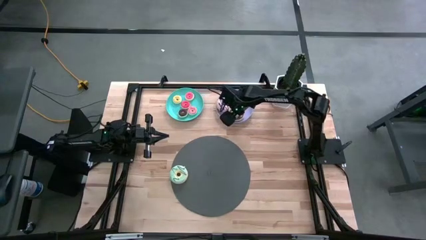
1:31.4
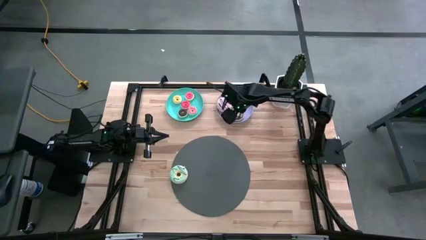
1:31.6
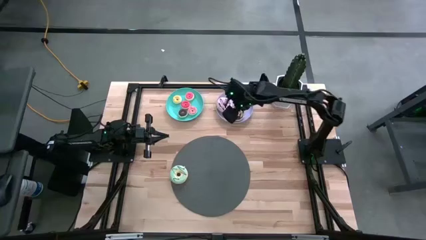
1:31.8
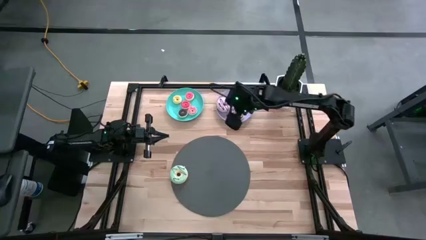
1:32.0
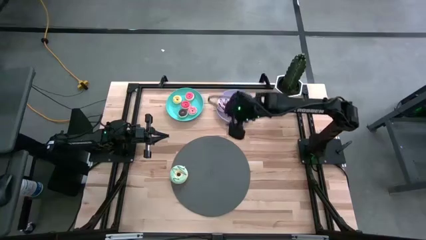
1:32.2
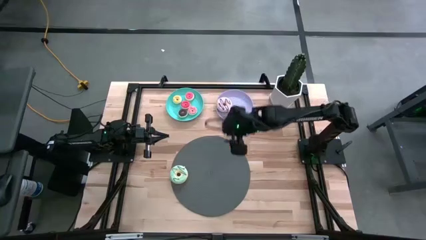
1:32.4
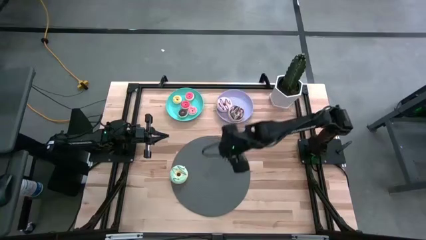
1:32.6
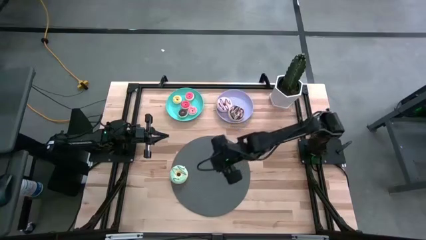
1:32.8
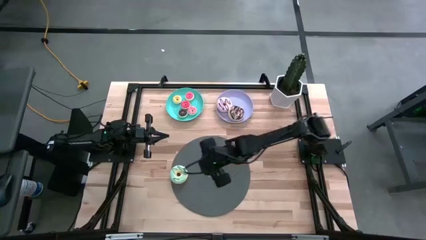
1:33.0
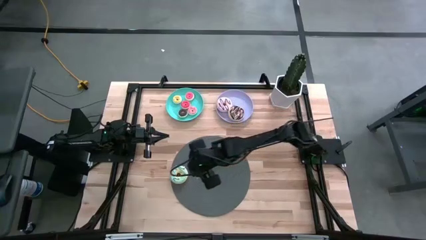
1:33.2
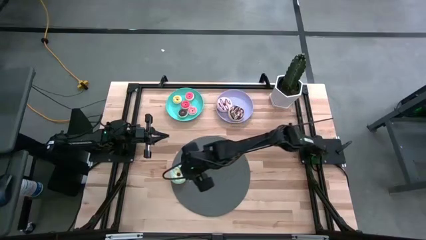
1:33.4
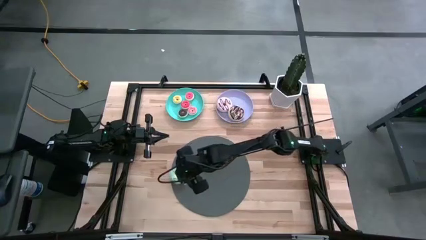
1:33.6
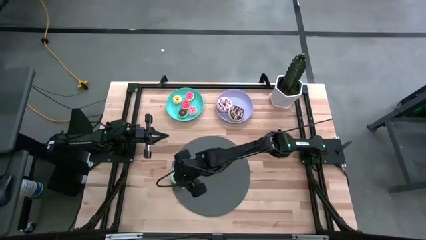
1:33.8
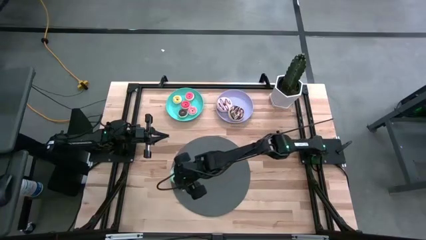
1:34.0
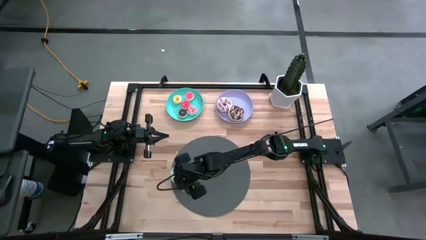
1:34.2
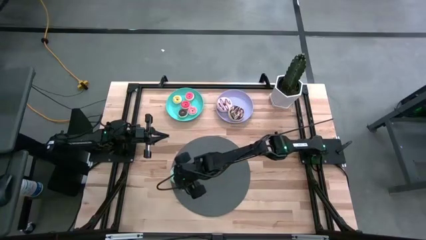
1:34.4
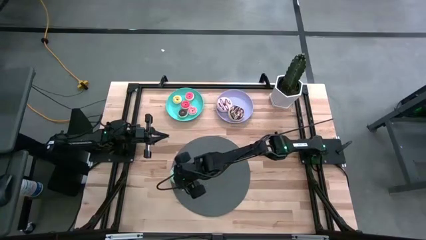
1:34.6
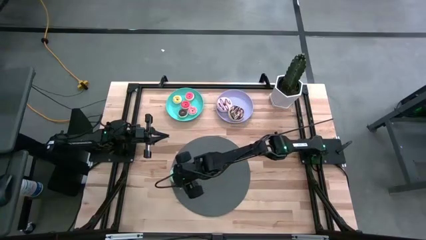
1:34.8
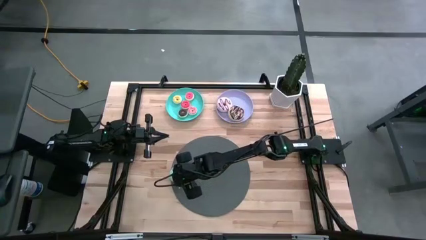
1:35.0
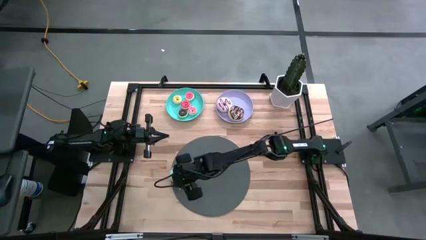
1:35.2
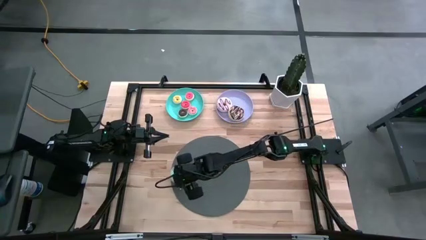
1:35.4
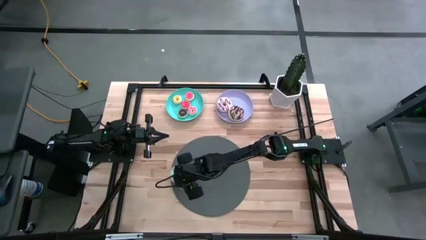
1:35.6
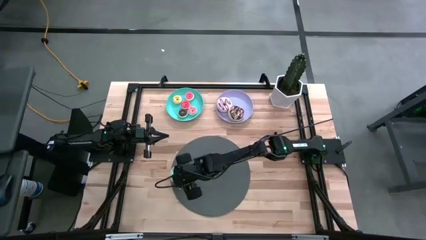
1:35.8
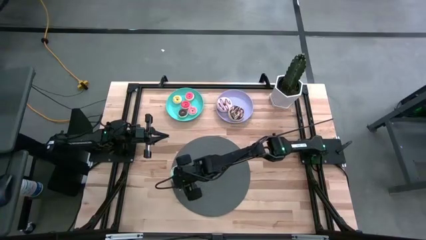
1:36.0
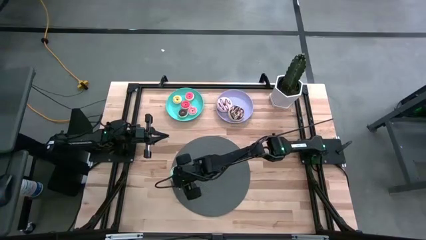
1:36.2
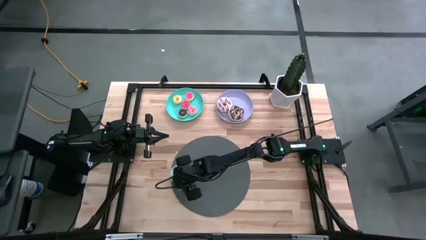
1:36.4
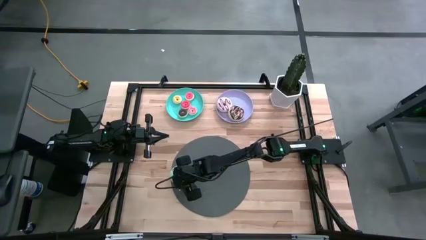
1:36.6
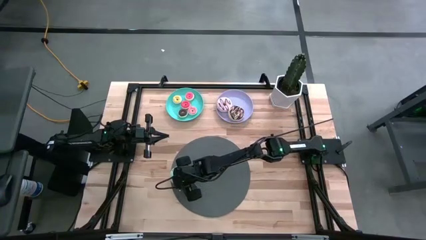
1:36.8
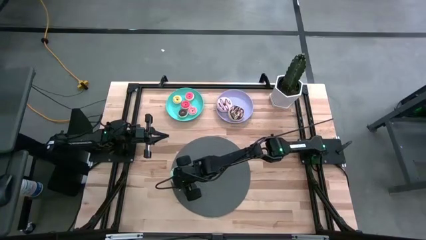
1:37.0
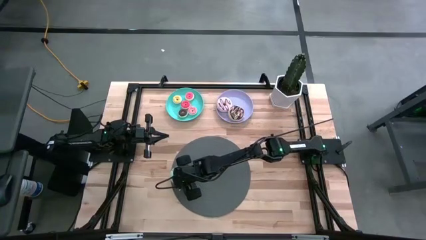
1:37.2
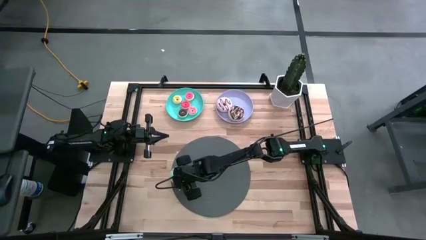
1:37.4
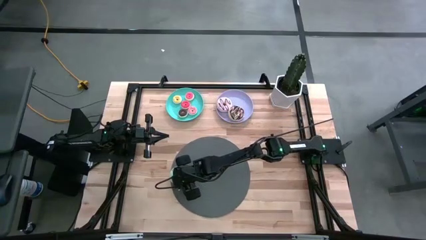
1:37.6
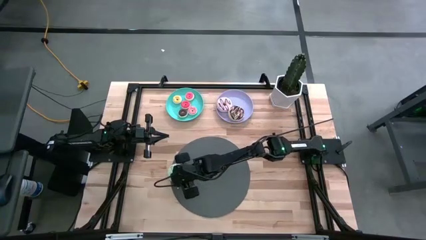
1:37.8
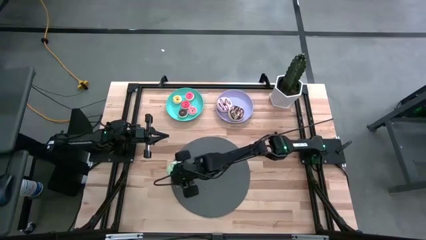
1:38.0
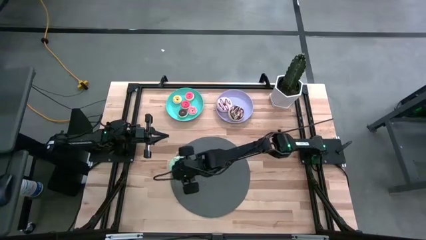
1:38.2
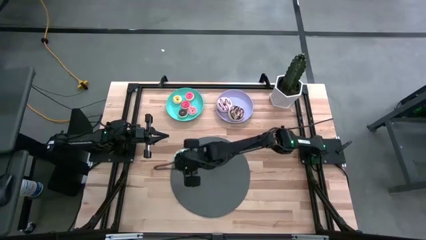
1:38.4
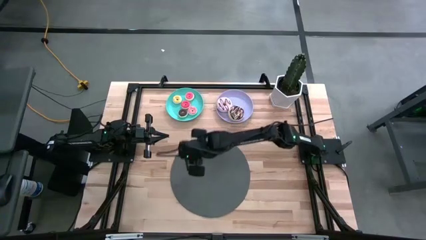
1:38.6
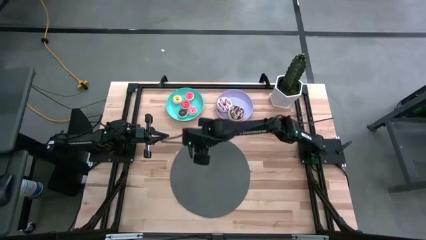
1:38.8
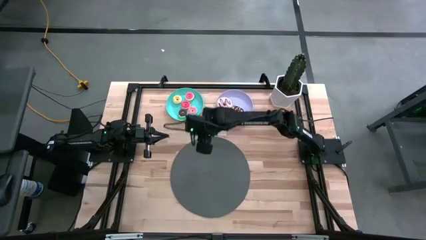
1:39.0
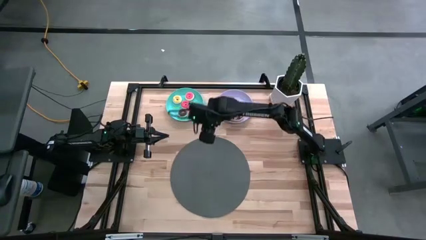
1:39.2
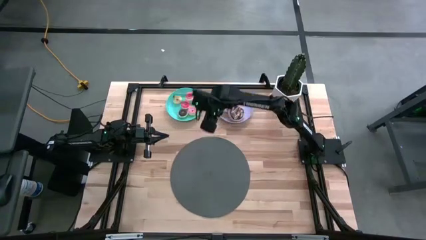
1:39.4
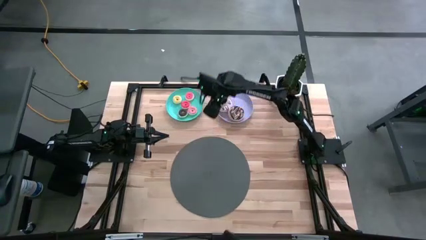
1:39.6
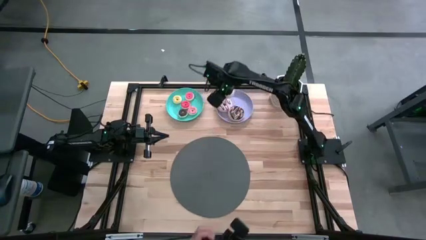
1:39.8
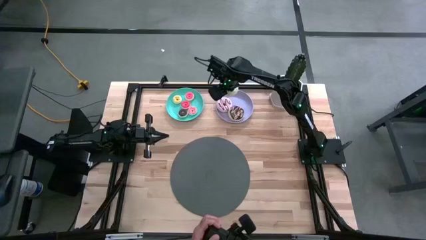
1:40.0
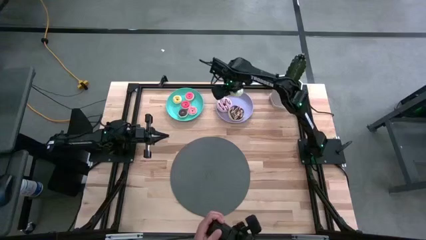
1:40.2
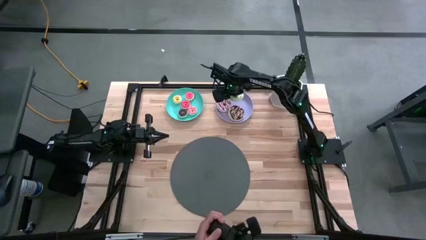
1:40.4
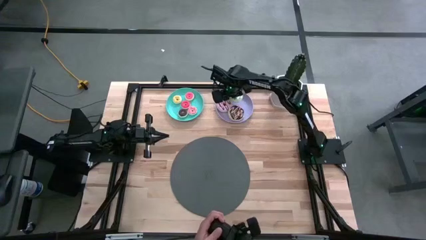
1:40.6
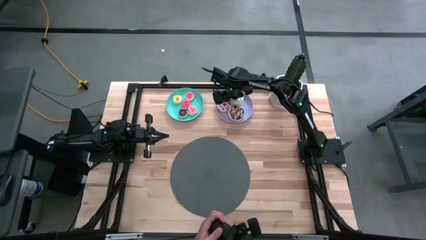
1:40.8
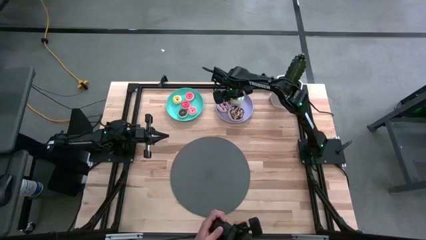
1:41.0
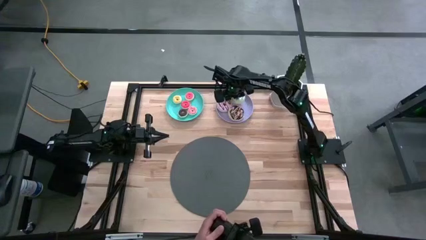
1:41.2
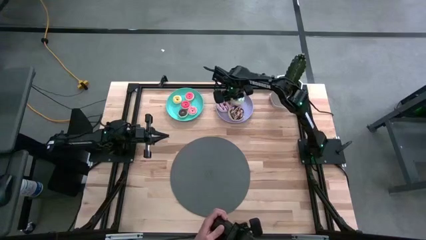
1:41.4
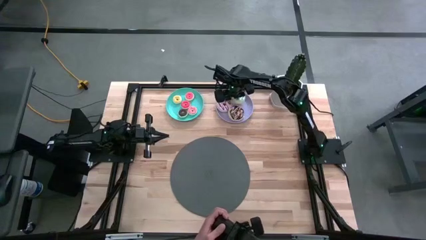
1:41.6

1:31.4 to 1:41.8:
Task: Pick & Place donuts
Put the large green donut on the purple plate

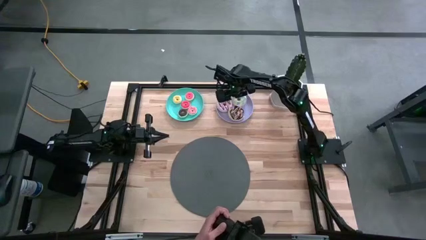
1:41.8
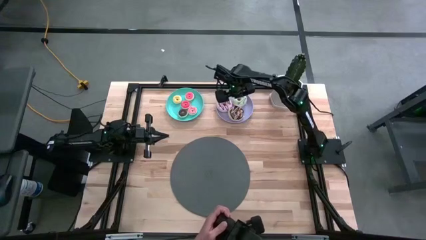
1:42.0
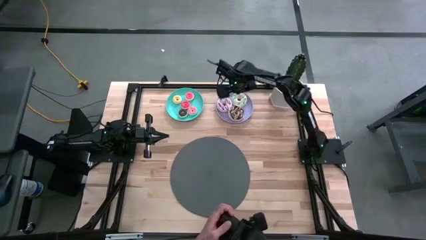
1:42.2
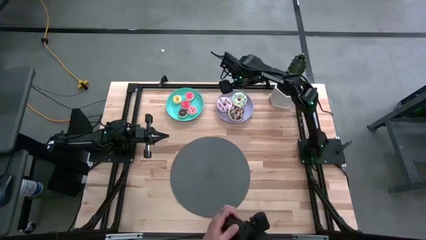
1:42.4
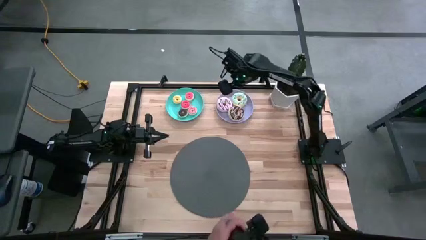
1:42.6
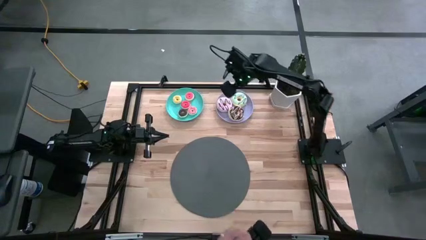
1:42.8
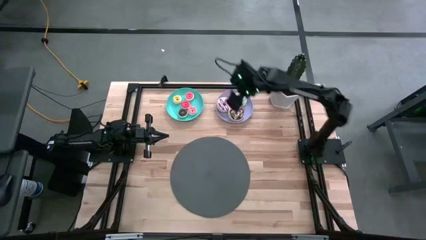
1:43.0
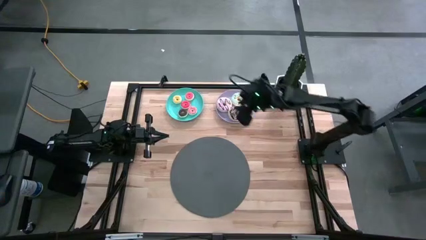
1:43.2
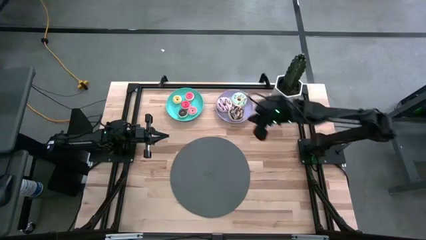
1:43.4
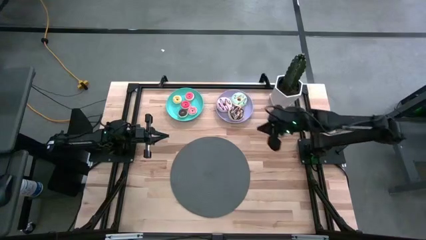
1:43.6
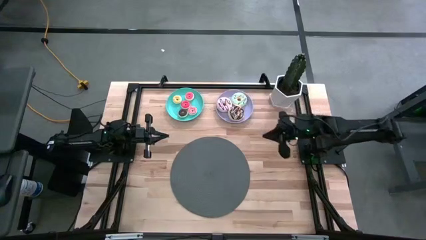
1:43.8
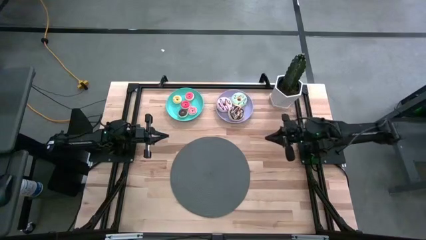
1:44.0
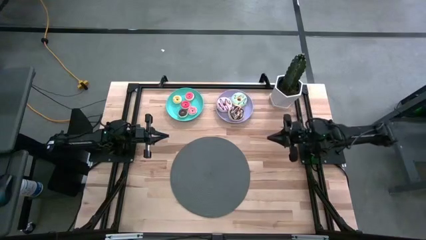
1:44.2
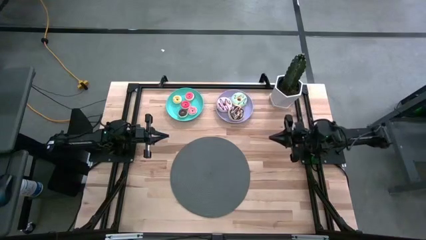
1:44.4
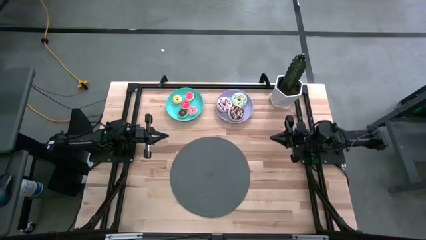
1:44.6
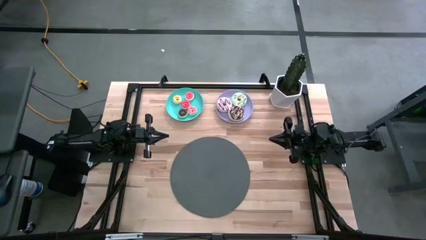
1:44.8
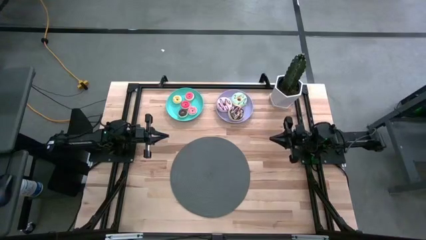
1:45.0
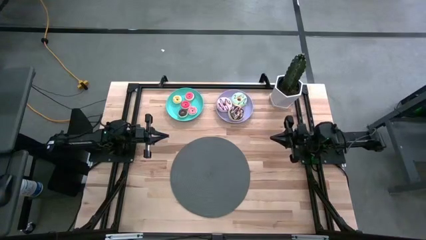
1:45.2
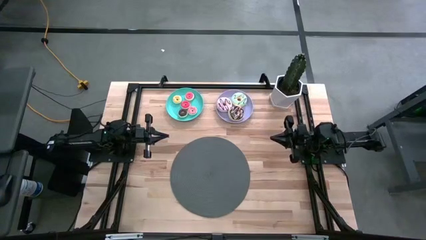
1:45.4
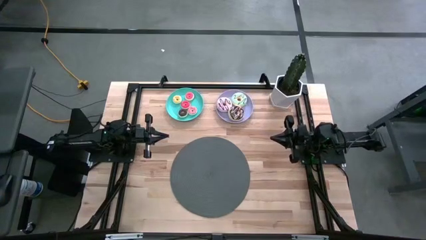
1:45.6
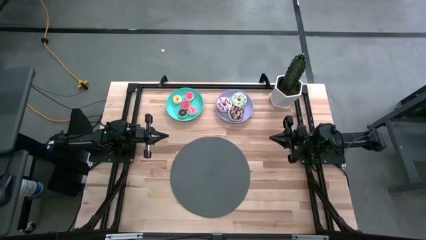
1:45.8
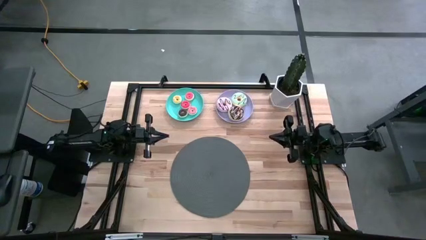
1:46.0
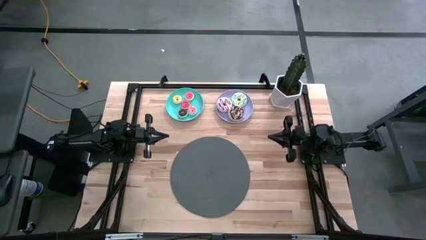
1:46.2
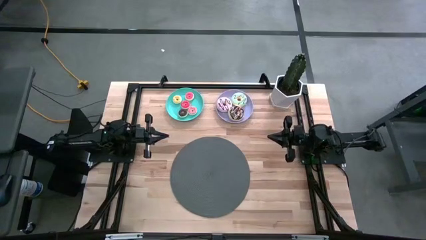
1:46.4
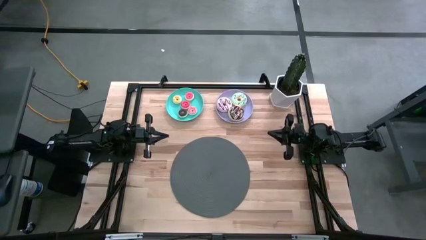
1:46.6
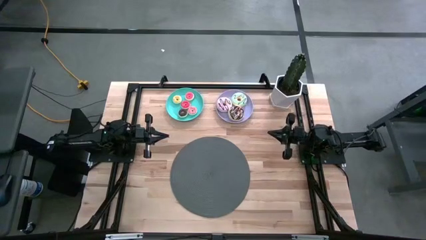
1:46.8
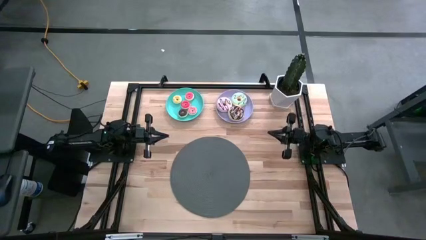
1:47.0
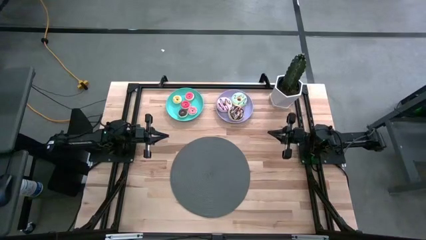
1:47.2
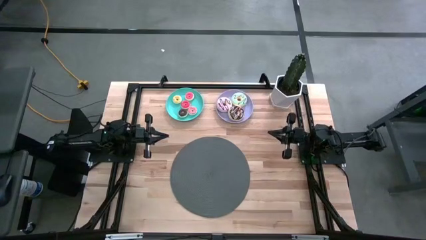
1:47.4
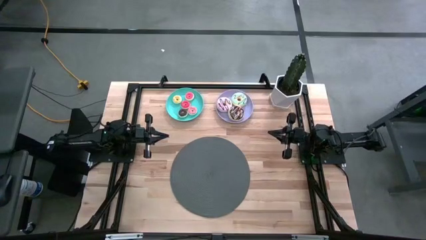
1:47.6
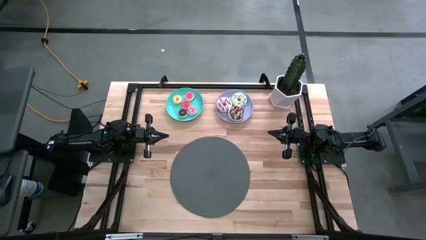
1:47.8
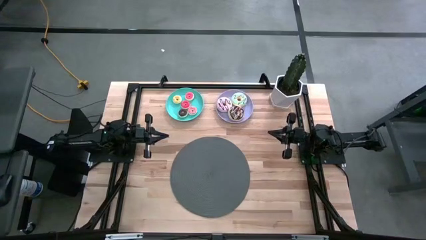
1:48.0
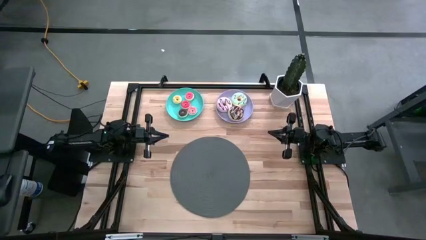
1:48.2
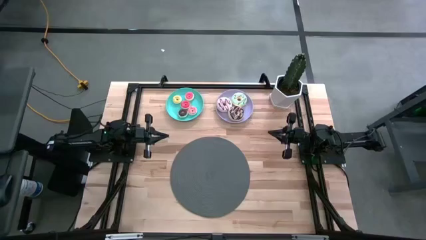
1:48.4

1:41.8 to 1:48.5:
Return to Home Position

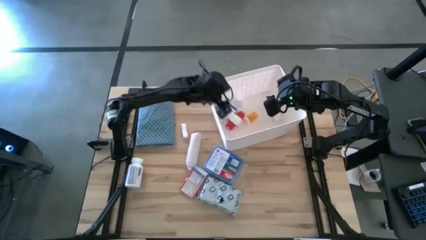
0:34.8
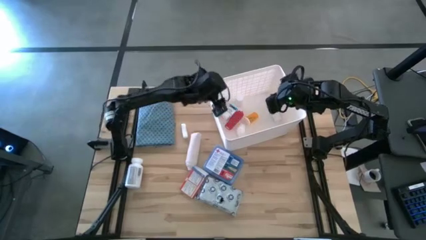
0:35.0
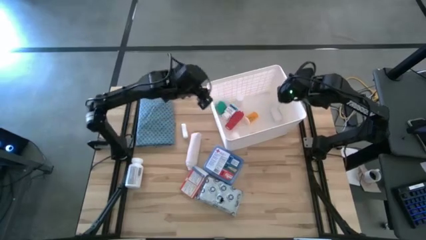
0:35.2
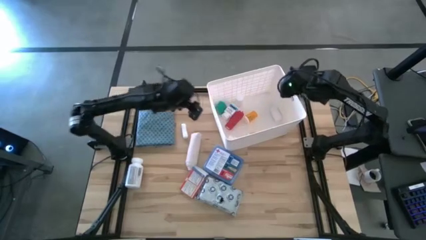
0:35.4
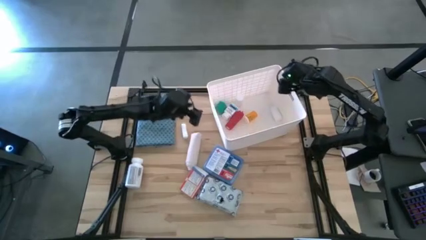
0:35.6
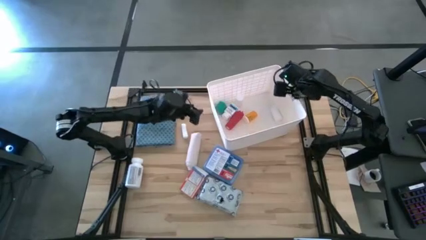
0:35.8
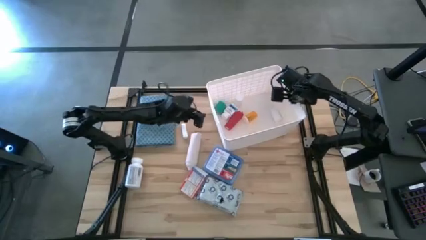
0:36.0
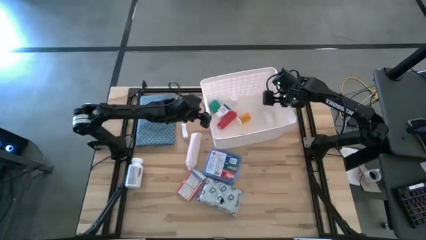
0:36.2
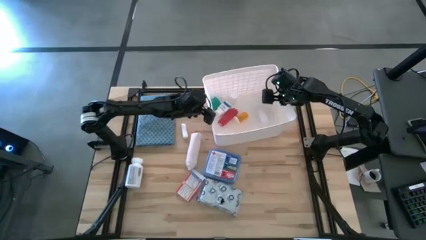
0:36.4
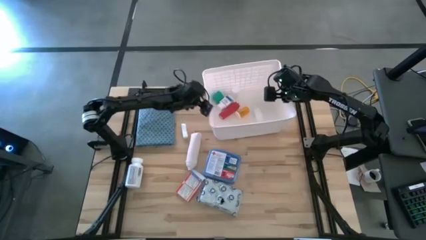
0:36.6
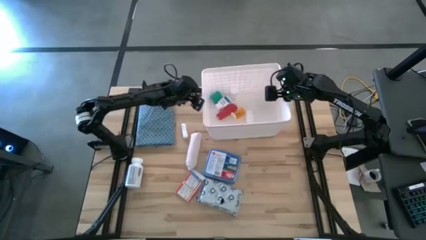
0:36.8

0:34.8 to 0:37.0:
Task: Pick & place medical supplies in basket/bin
Adjust the white bin
